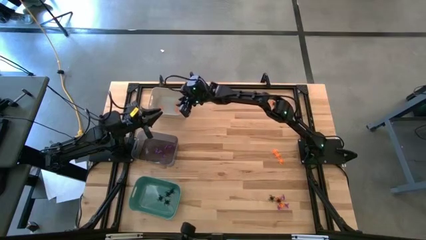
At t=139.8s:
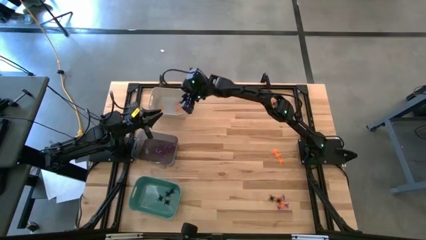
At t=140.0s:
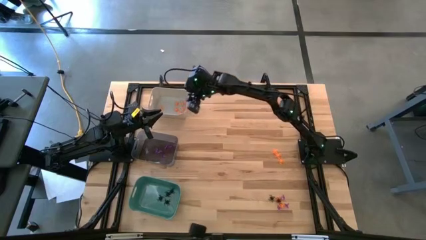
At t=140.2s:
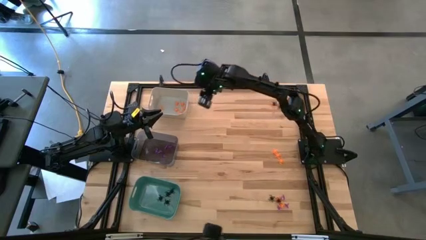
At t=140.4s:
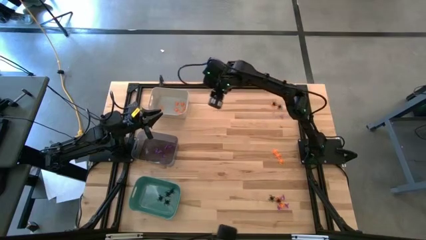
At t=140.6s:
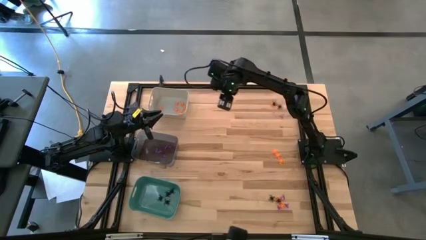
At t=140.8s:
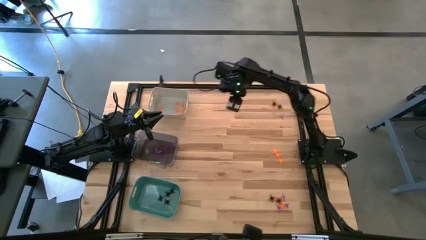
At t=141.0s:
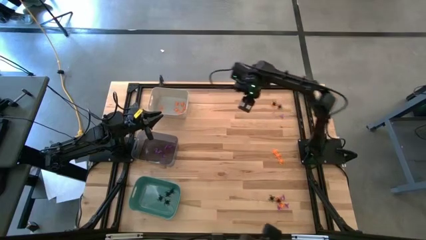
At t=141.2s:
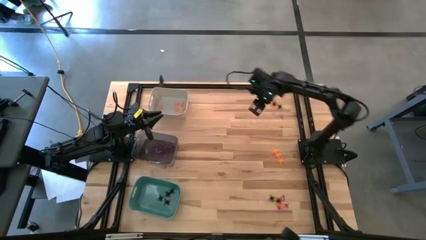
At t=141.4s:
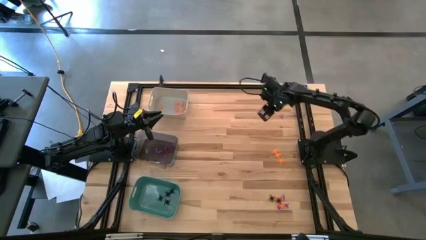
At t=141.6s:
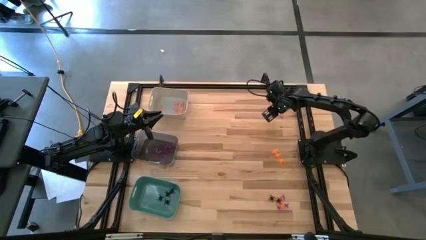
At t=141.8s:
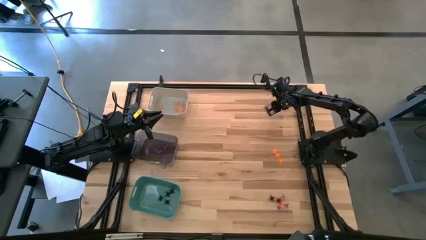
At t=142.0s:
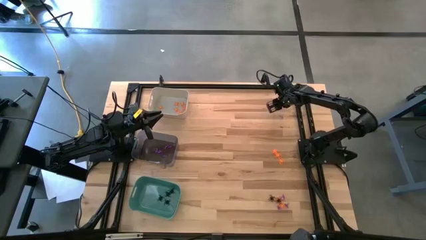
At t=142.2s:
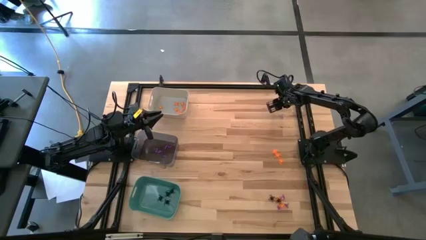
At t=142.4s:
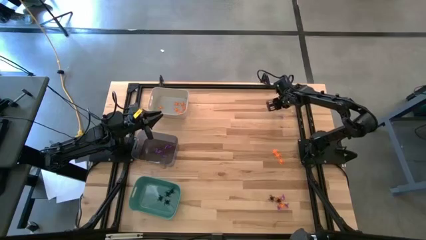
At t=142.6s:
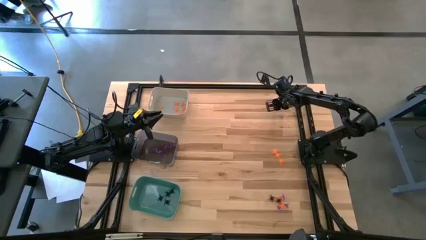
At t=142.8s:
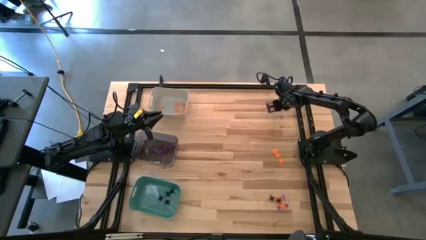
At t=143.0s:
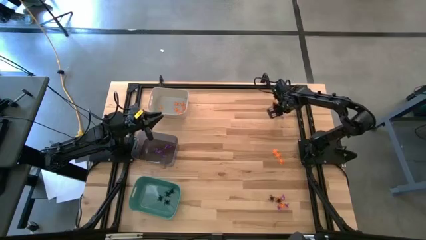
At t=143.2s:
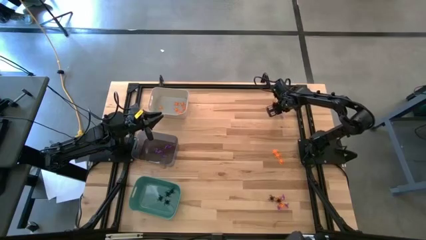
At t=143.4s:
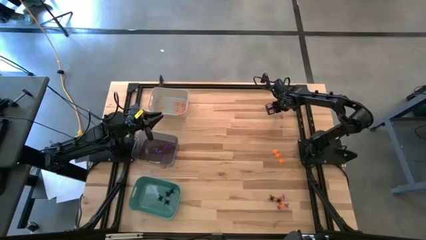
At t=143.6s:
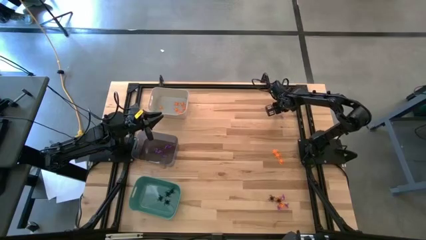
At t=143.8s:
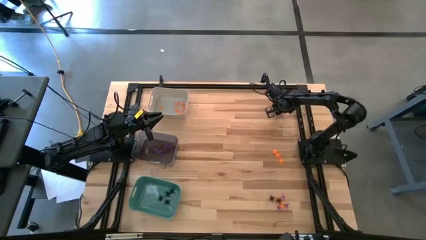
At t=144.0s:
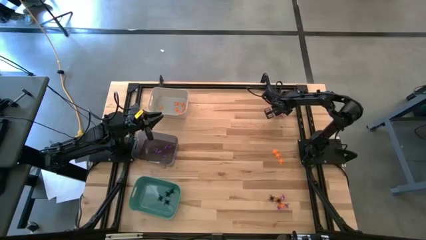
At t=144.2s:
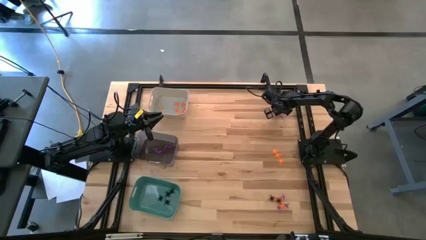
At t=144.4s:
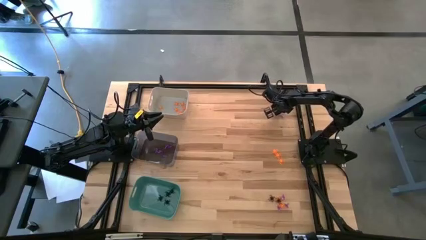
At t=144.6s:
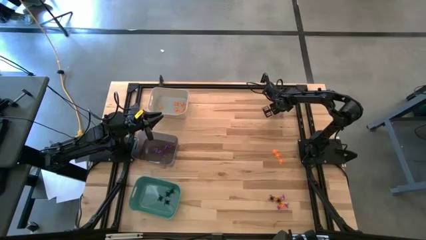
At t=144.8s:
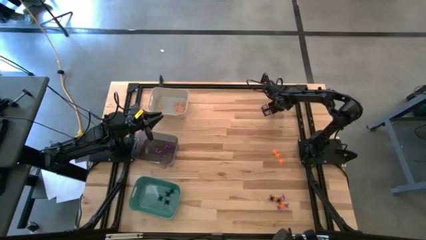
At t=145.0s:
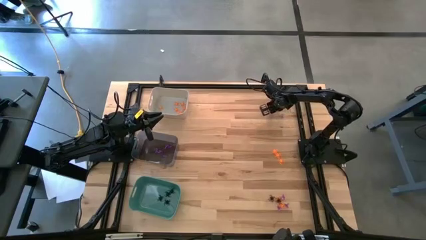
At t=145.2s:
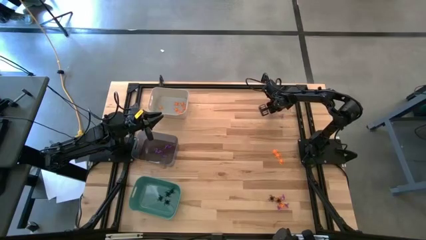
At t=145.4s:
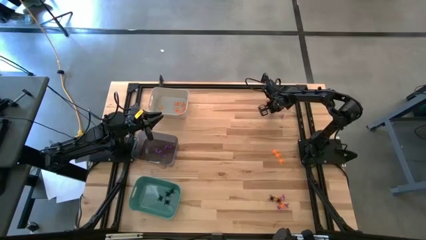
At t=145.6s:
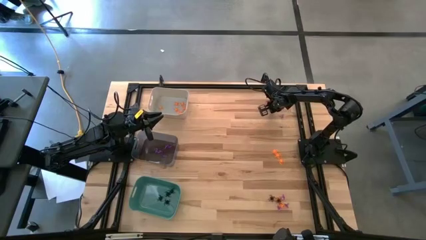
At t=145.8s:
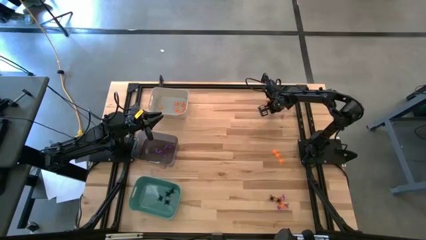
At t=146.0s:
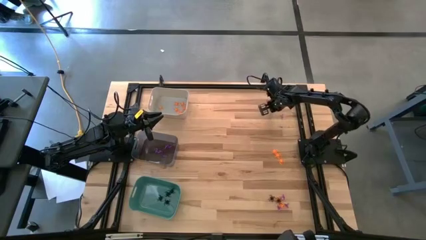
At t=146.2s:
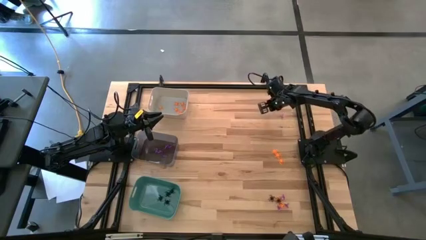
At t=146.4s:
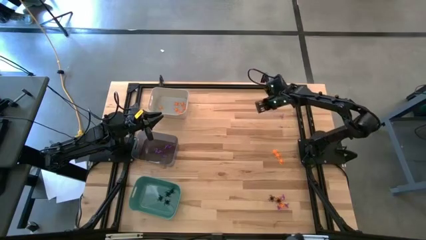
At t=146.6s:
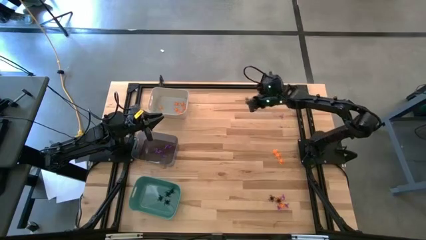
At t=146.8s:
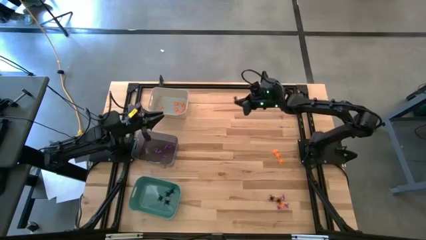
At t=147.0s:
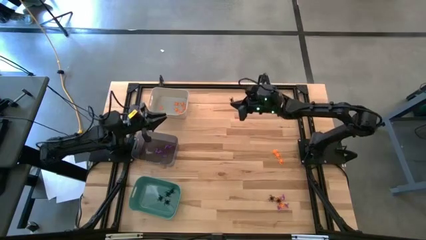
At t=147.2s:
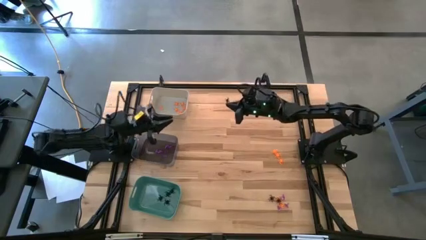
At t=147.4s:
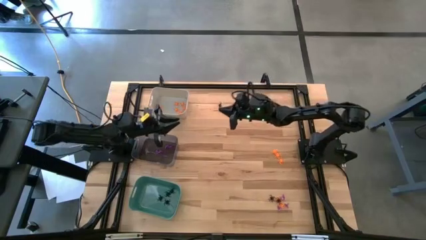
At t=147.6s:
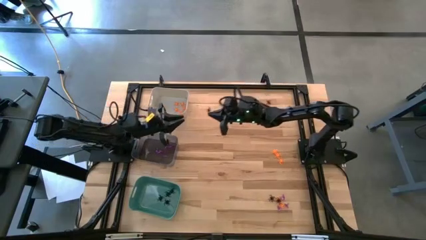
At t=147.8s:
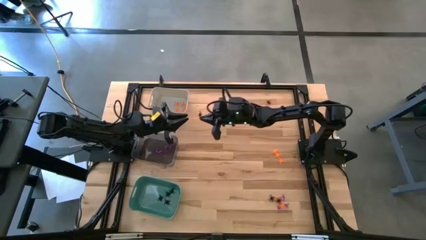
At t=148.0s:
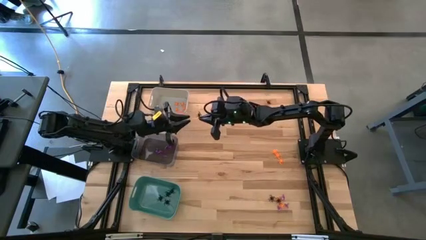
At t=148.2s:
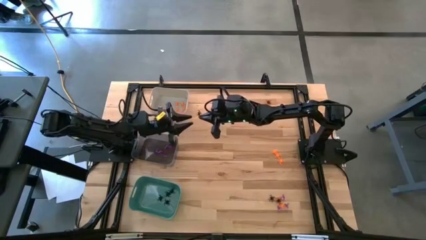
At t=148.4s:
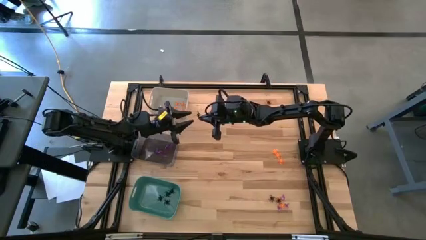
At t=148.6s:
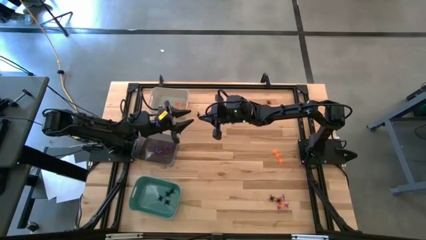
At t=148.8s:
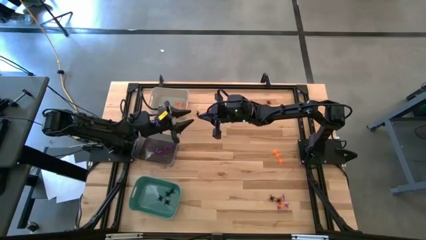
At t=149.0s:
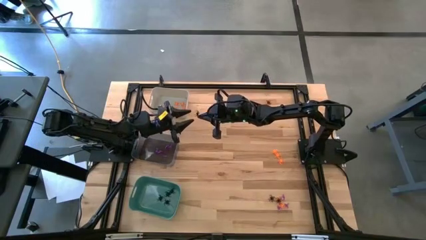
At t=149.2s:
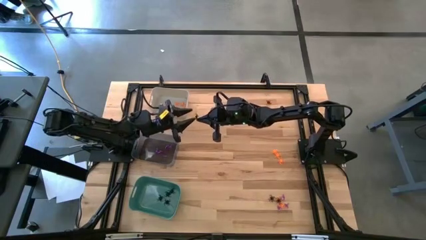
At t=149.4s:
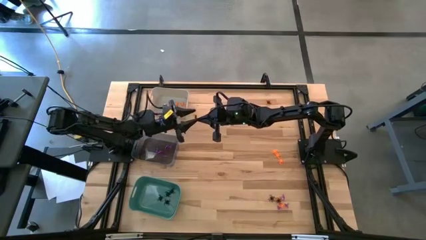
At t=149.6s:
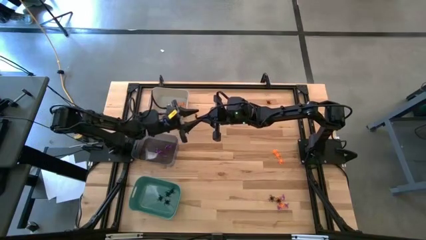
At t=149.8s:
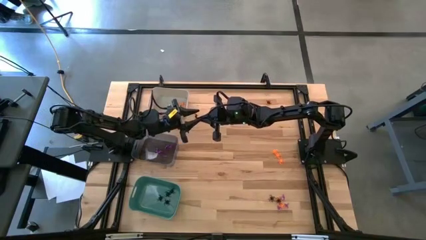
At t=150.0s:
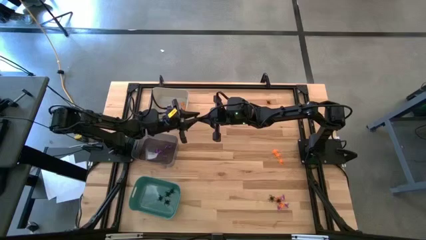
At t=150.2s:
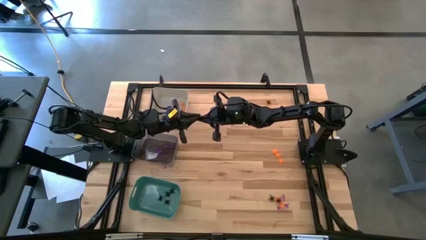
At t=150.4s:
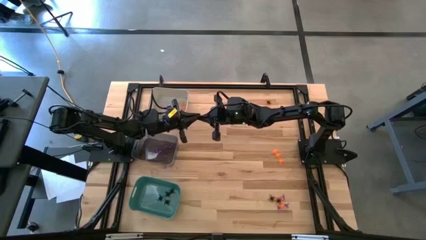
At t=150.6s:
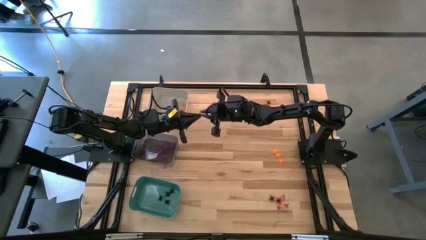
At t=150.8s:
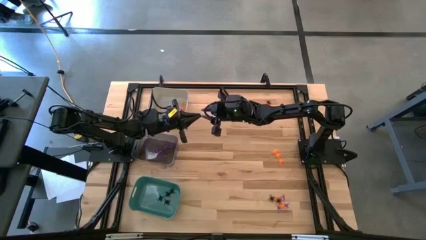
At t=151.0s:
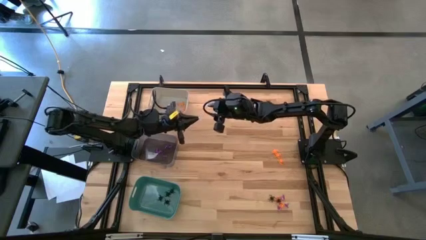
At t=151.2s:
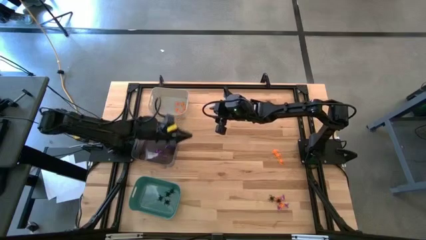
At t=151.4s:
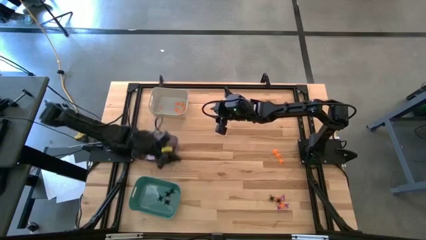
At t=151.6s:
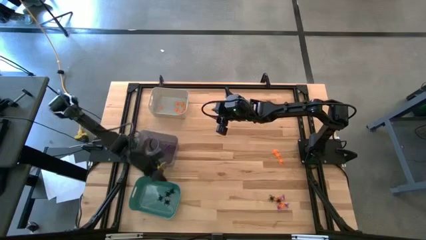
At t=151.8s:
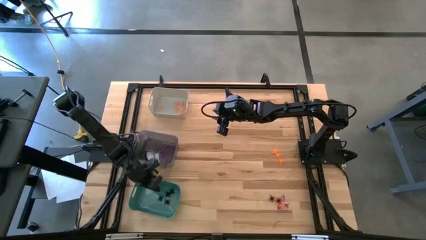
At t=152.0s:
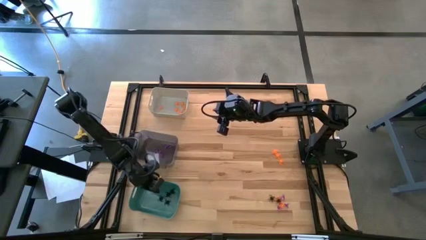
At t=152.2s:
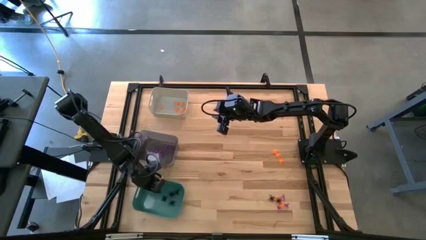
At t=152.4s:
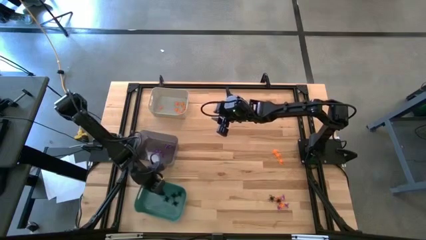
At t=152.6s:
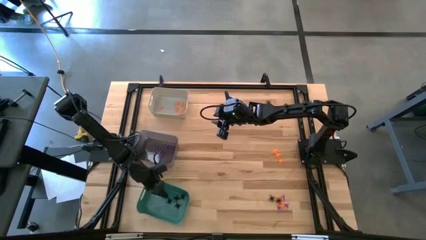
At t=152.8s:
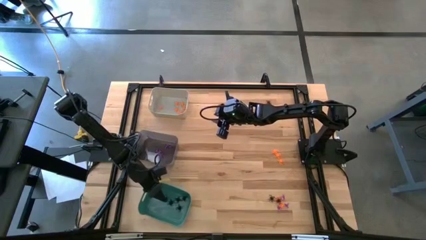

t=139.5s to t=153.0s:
Task: Sort Halloween decoration
Put the top right black spider into the green bin

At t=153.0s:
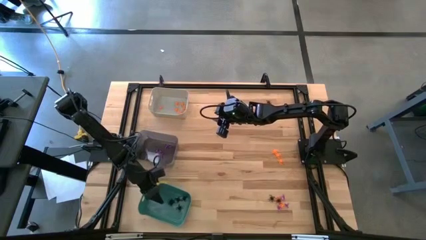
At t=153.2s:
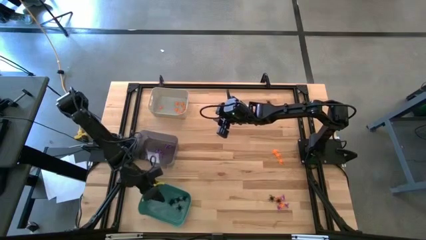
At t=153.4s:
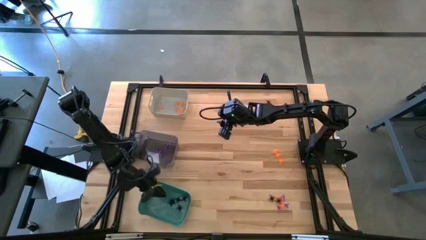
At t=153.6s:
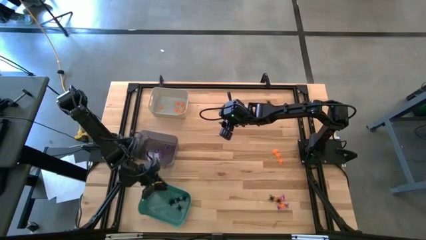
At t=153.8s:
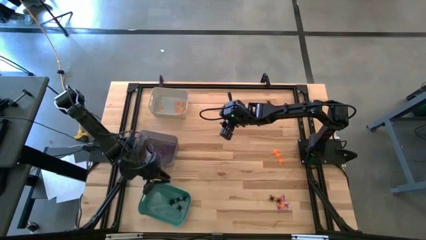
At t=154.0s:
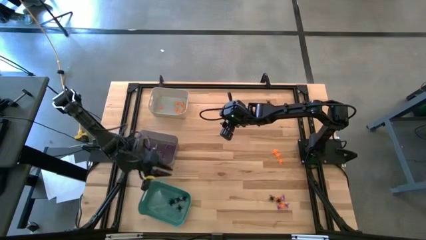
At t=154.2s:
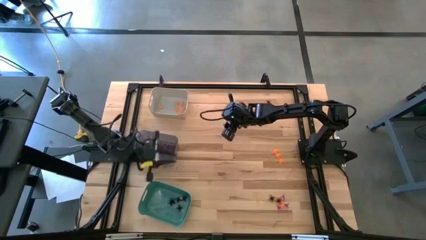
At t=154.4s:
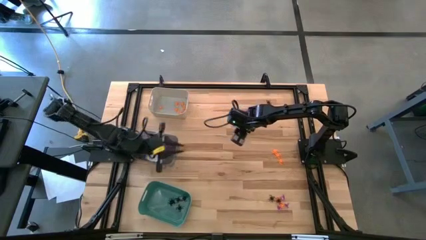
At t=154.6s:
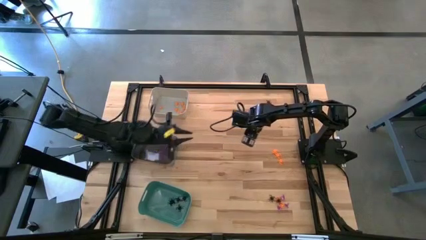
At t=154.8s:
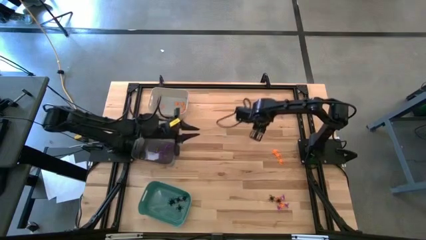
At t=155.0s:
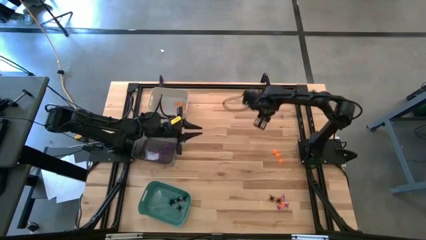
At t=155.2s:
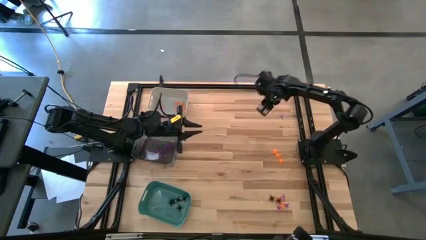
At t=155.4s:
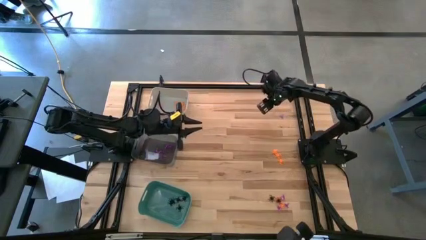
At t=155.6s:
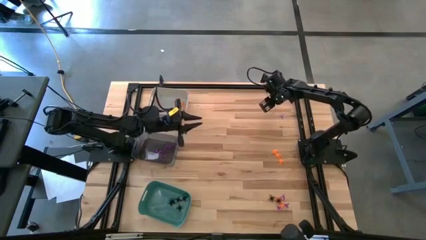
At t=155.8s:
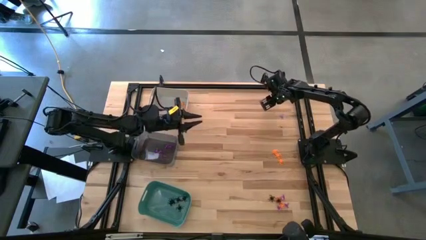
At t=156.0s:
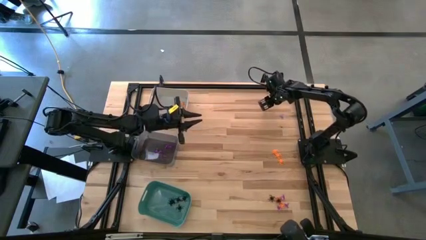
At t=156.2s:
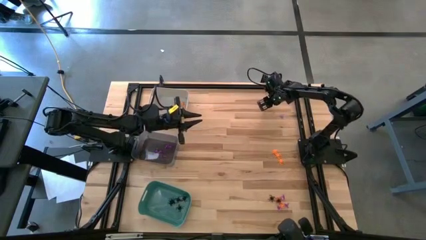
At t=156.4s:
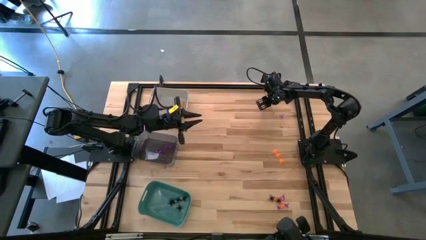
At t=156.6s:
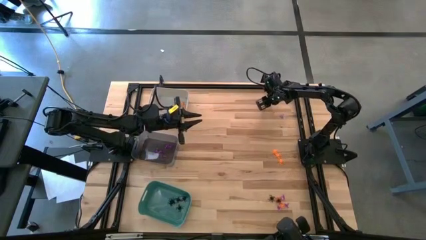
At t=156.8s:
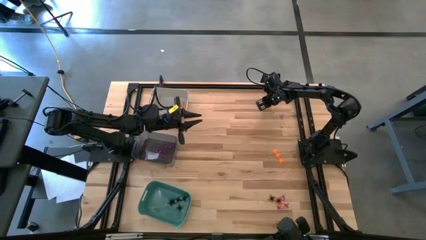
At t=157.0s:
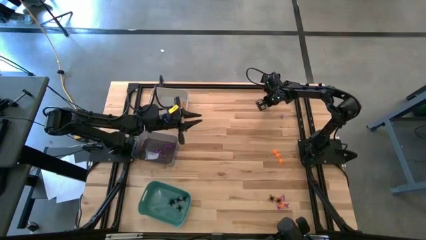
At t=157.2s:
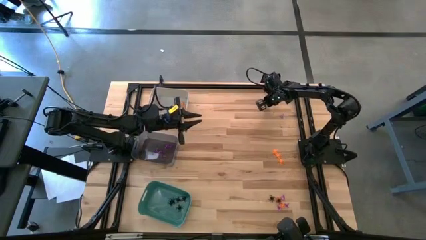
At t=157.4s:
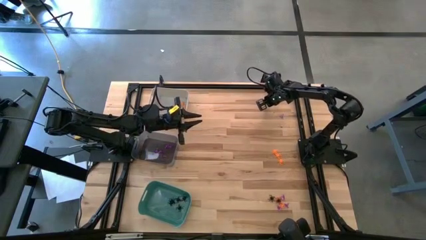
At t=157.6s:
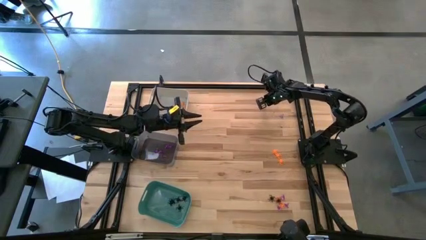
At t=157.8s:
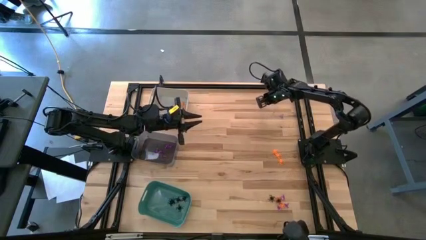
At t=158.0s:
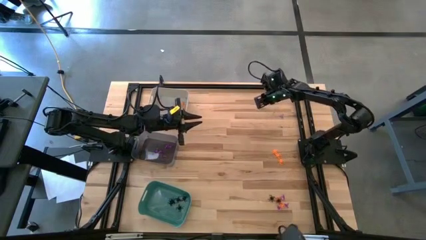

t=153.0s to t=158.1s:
Put the top right black spider into the green bin
